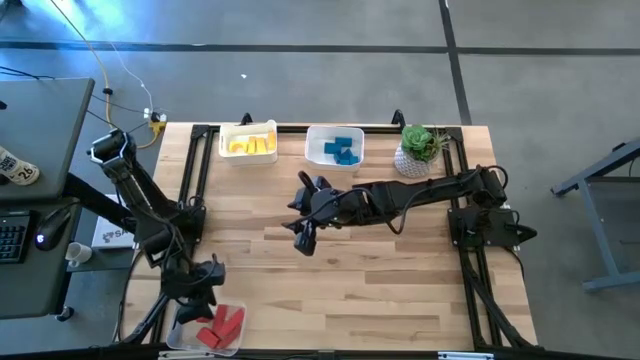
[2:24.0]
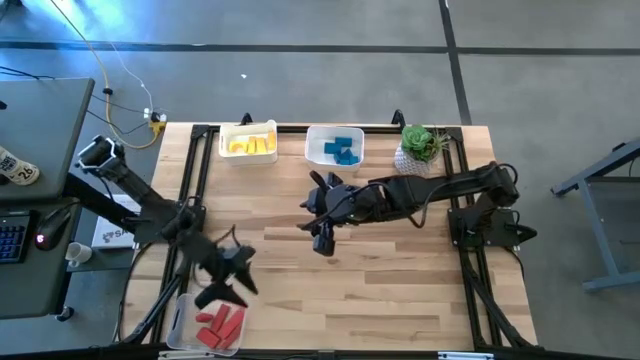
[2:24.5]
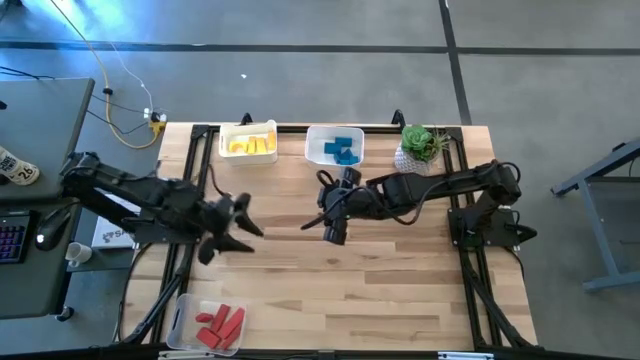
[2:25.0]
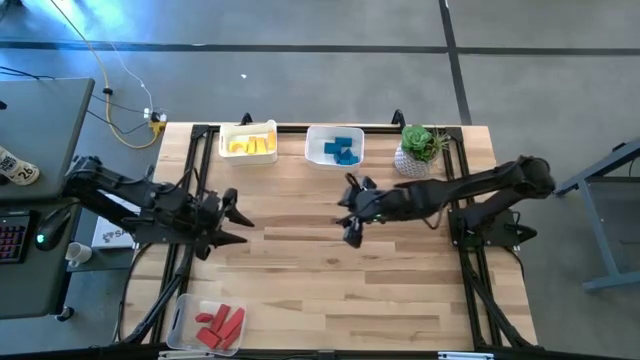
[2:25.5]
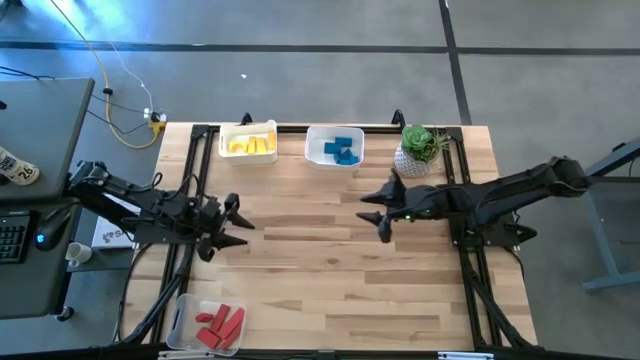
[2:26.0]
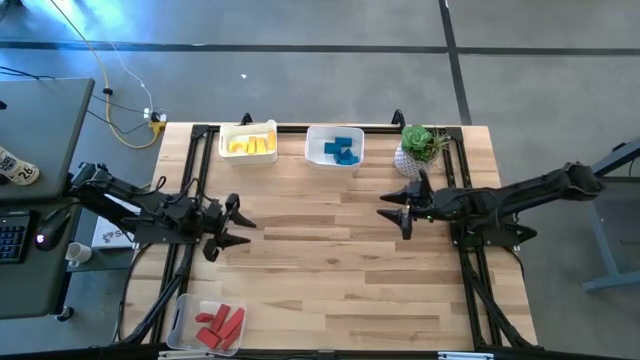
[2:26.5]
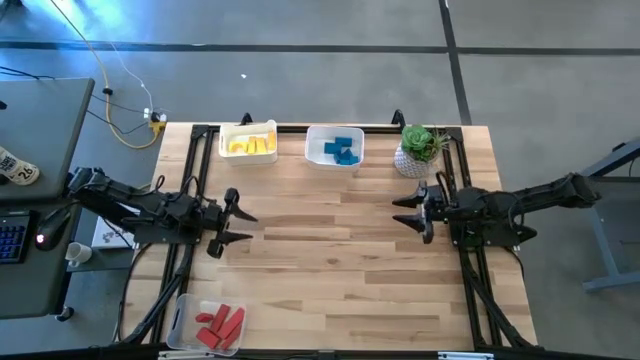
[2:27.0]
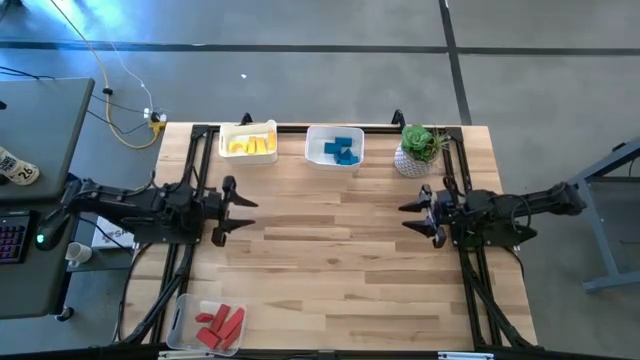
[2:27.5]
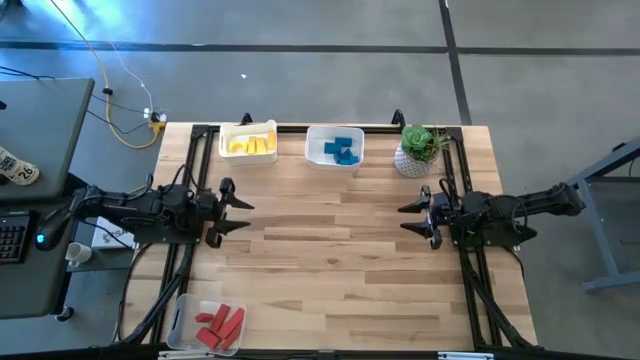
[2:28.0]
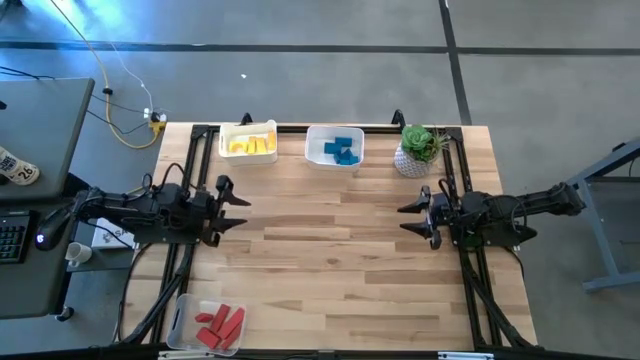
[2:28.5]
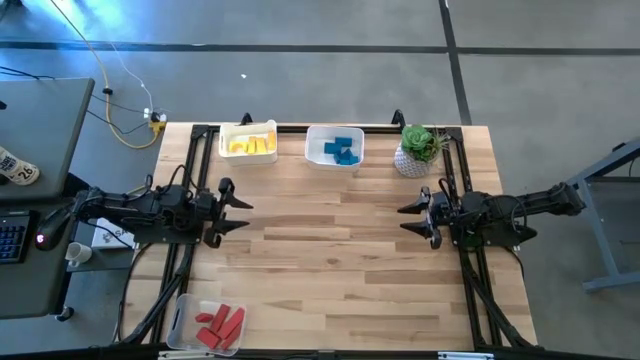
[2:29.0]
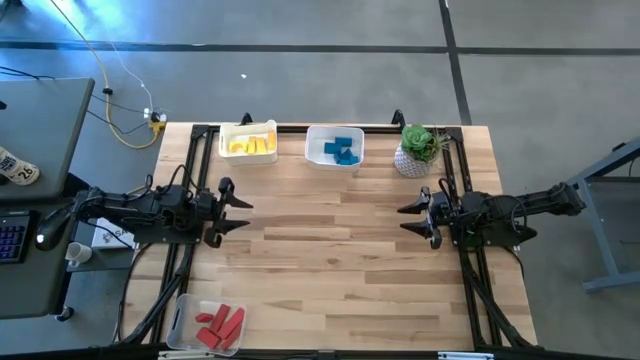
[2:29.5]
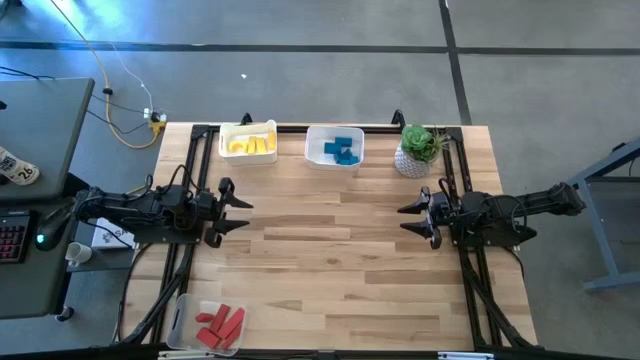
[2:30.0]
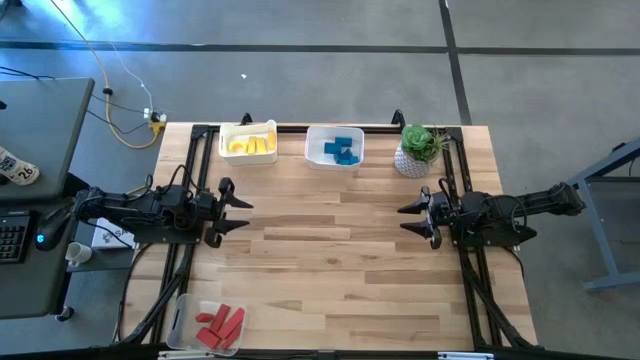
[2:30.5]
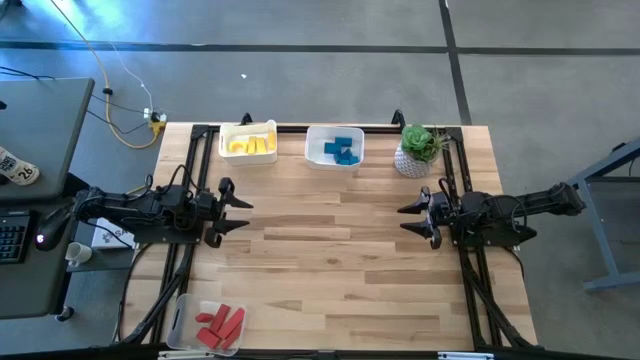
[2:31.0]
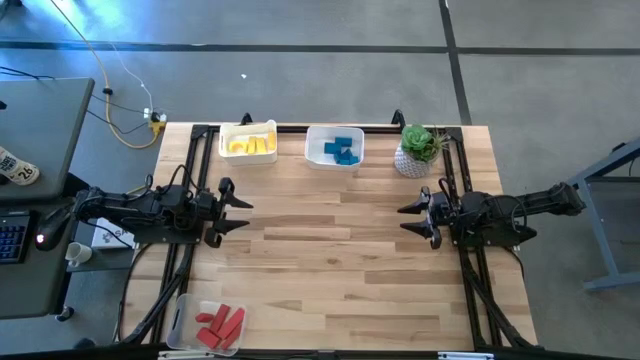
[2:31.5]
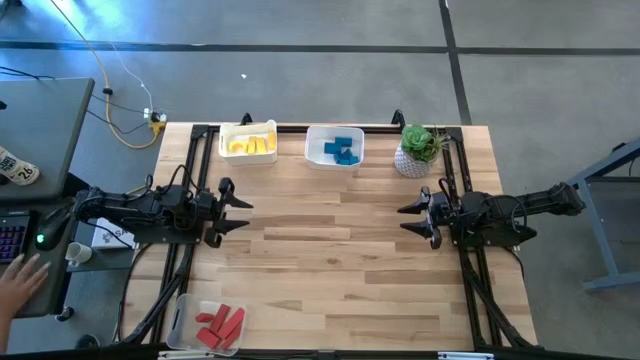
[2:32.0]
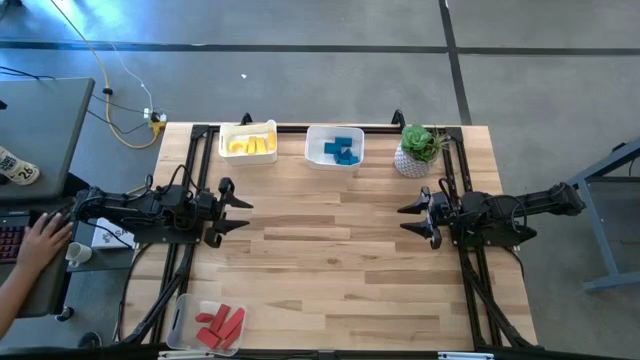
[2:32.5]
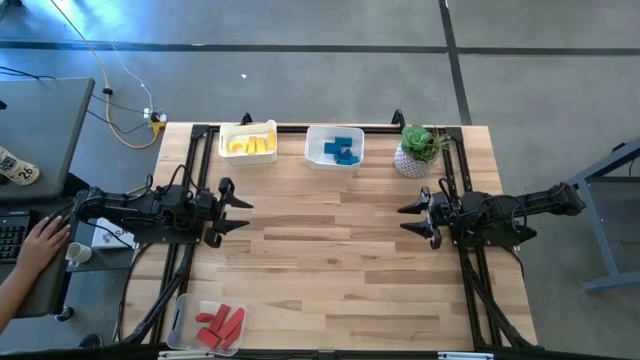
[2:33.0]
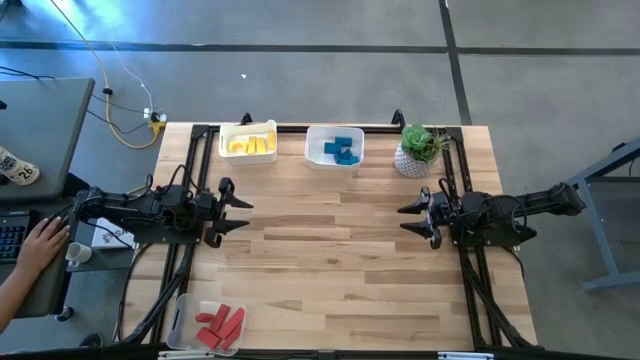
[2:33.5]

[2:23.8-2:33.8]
Task: Sort & place blocks by color
Return to Home Position

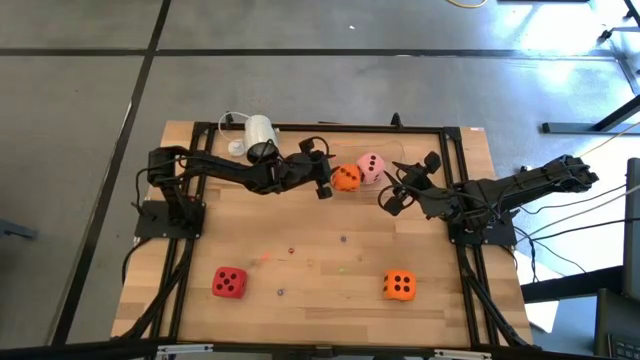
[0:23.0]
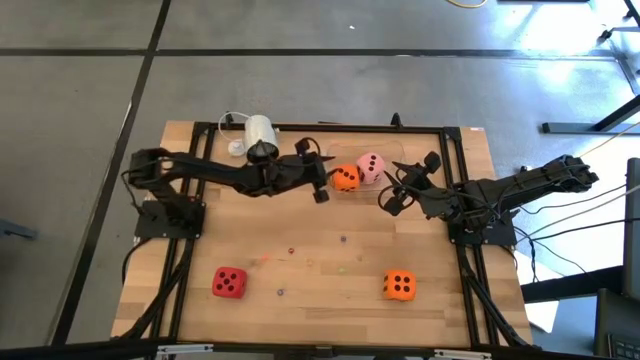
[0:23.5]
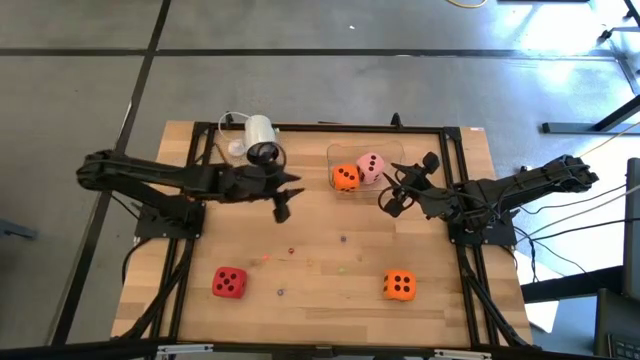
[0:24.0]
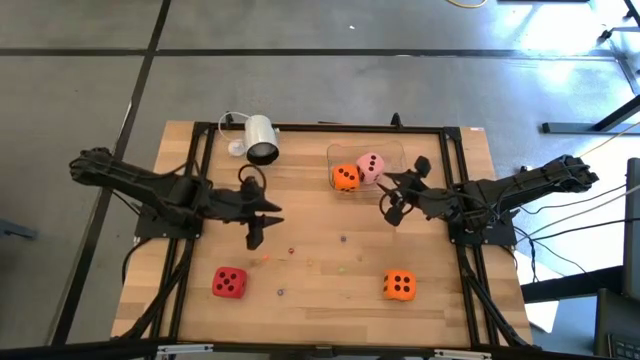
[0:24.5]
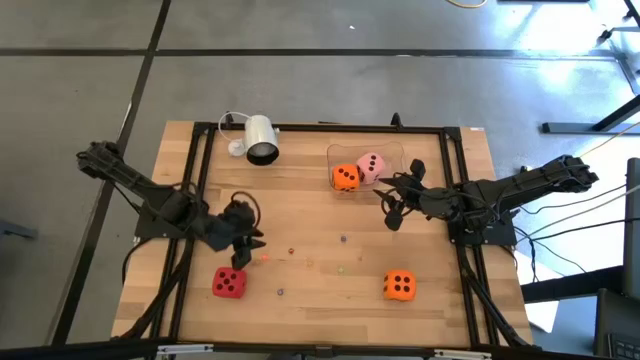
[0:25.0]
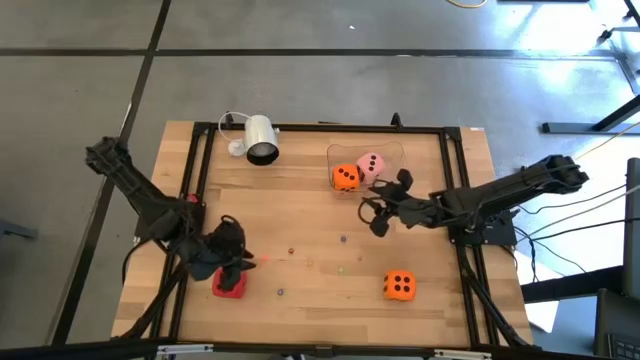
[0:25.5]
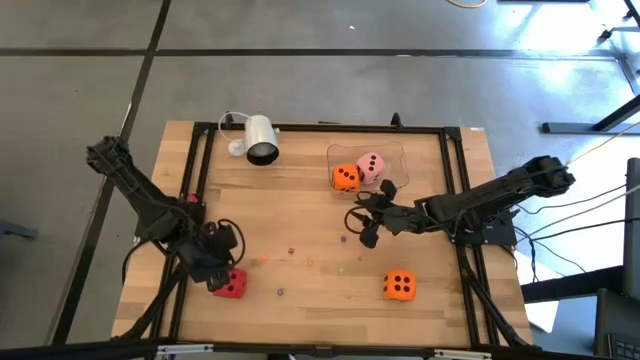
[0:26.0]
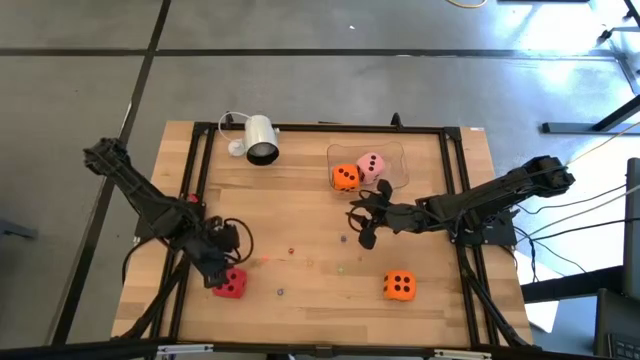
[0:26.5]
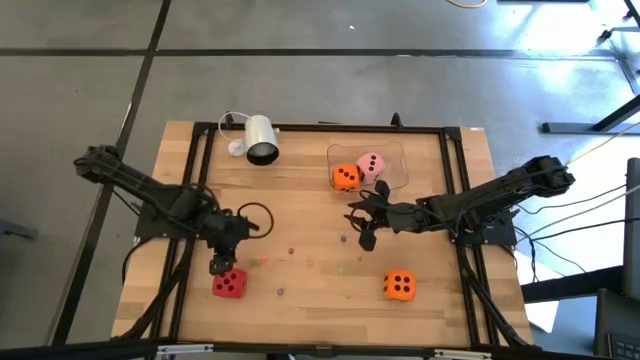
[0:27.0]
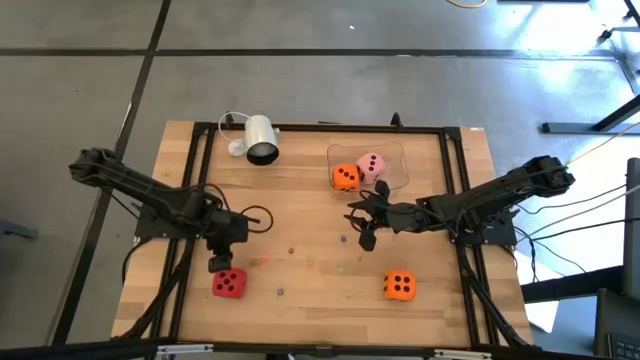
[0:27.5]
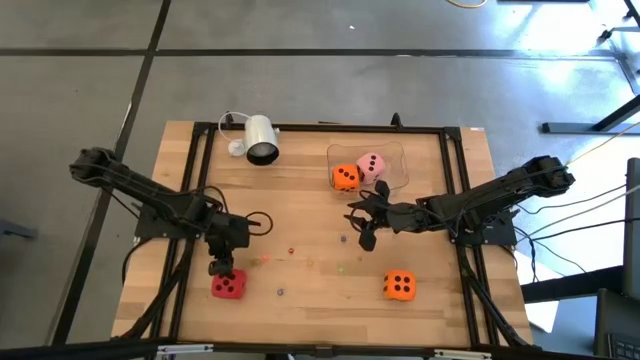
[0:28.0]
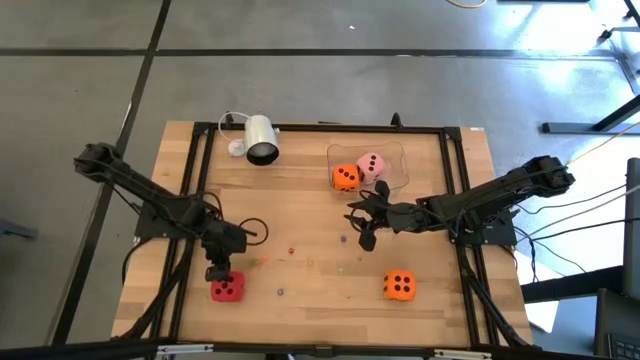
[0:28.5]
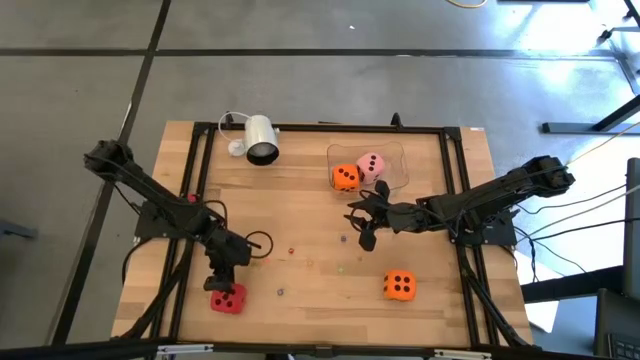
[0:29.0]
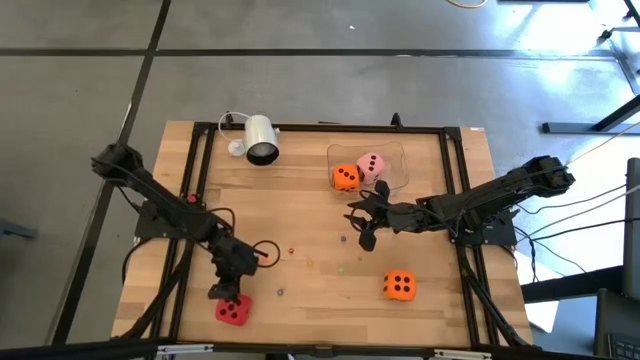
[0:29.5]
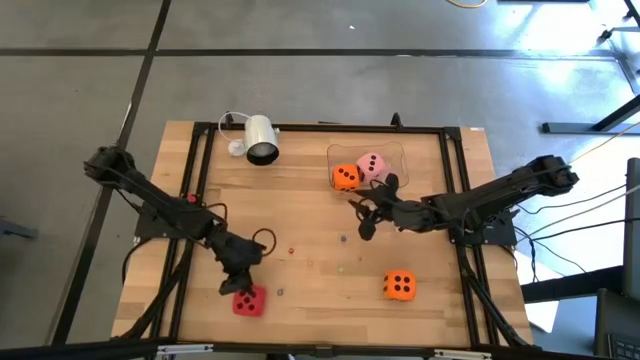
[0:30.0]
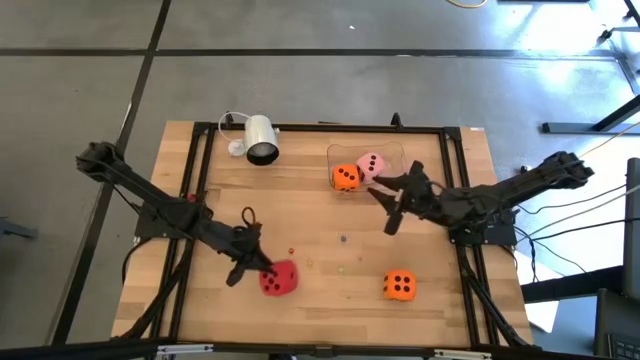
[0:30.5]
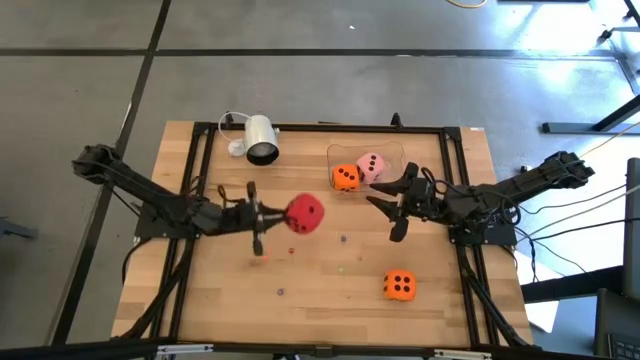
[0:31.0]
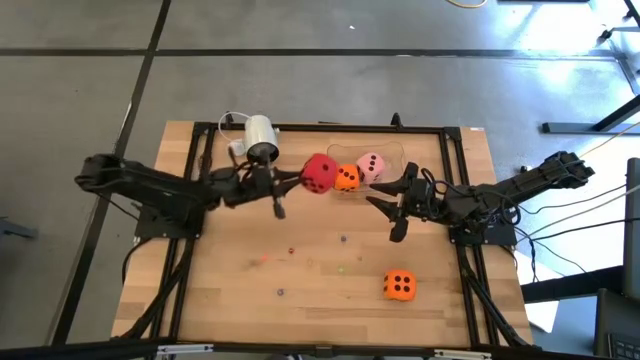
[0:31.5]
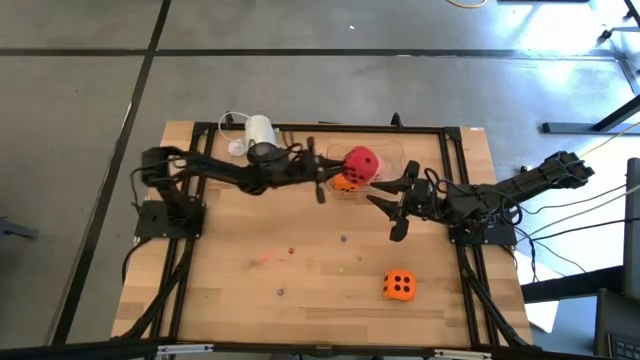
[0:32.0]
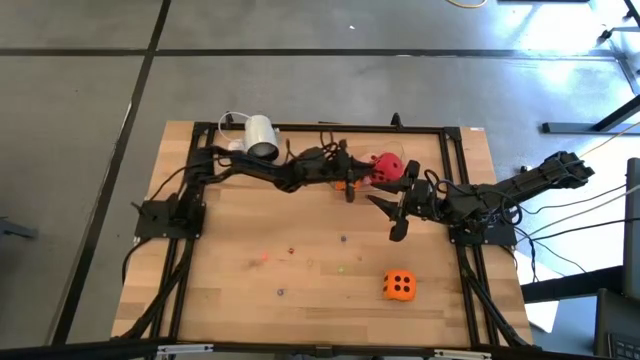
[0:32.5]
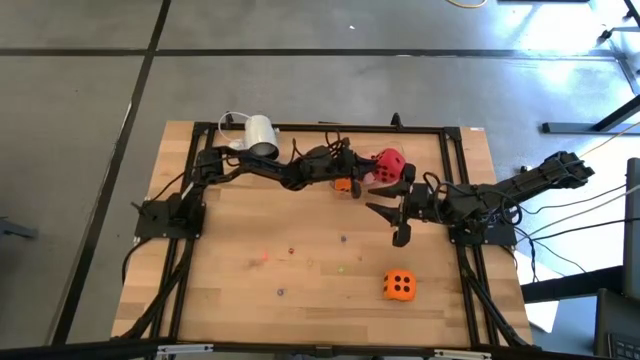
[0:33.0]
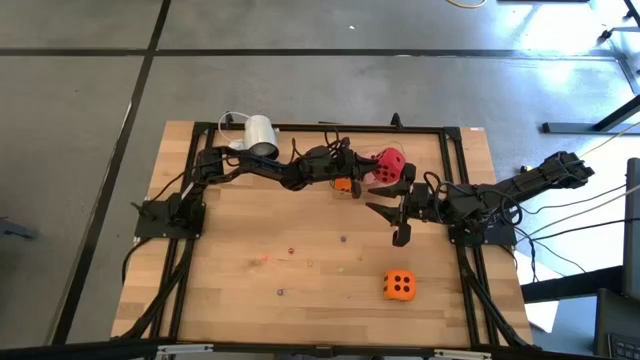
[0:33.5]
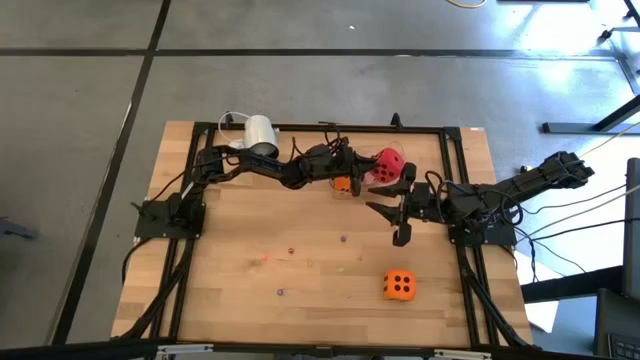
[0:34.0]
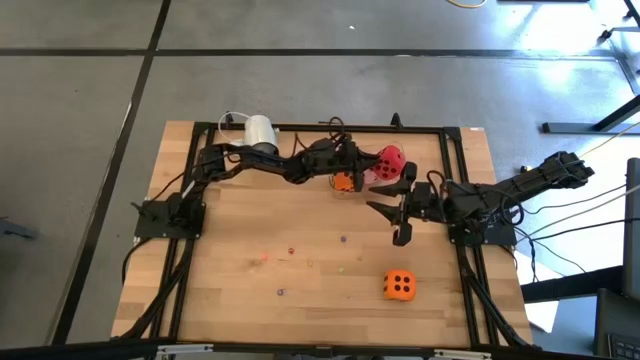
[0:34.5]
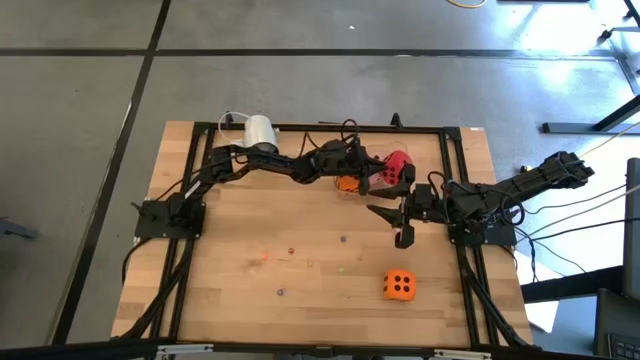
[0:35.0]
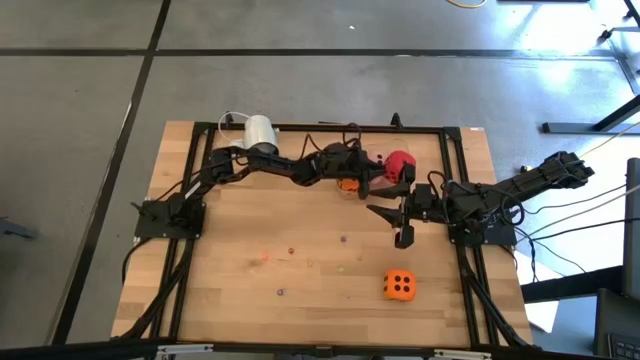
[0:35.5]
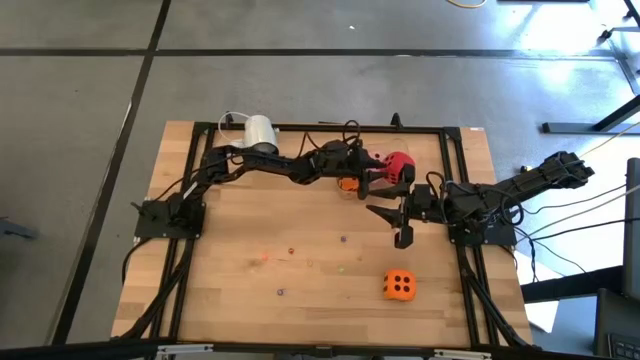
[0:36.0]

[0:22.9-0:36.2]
Task: Pick & Place Dice
Put the large red die into the transparent bin
